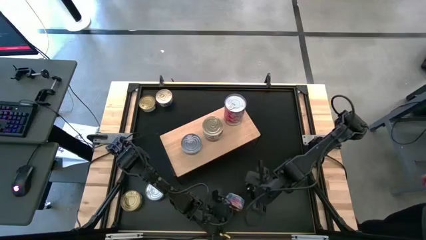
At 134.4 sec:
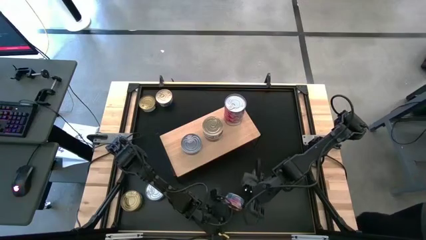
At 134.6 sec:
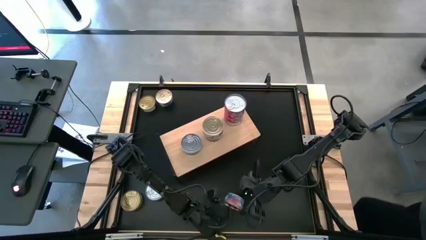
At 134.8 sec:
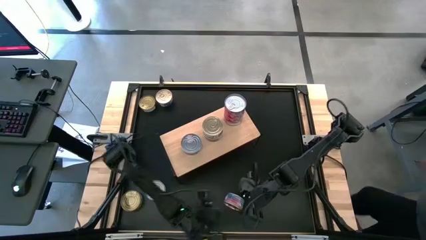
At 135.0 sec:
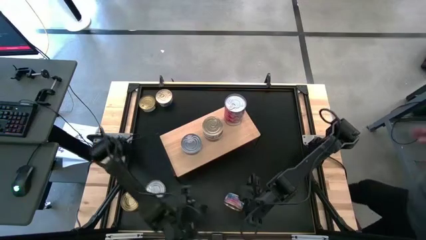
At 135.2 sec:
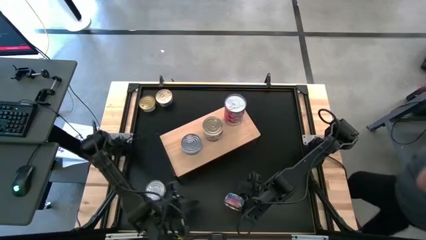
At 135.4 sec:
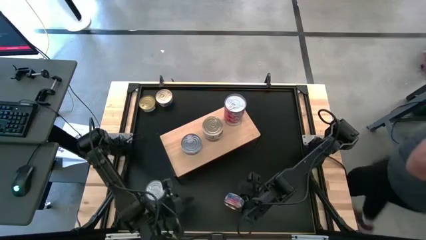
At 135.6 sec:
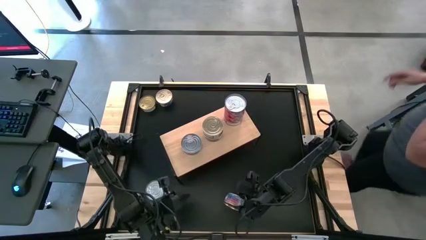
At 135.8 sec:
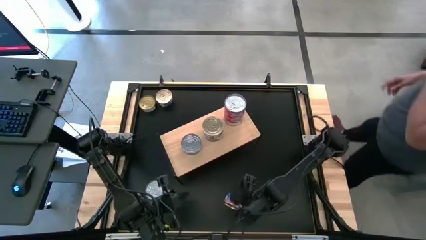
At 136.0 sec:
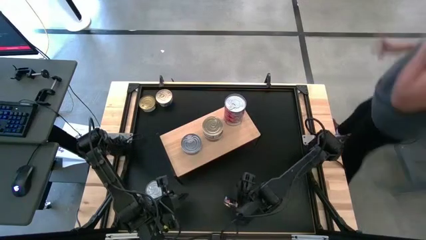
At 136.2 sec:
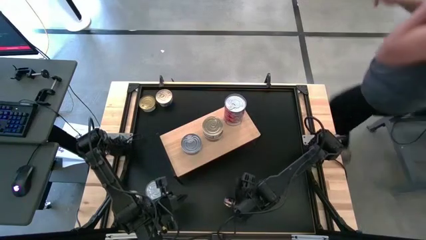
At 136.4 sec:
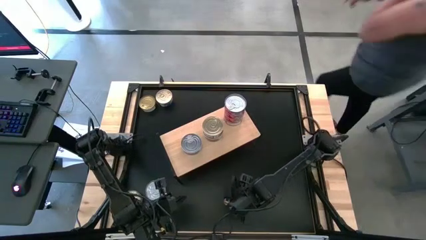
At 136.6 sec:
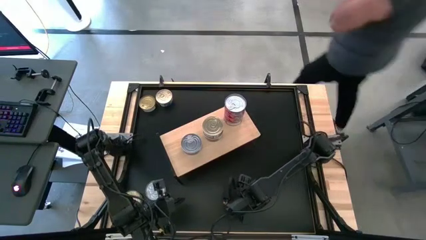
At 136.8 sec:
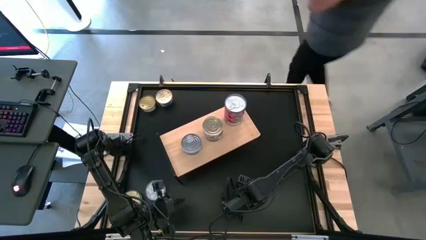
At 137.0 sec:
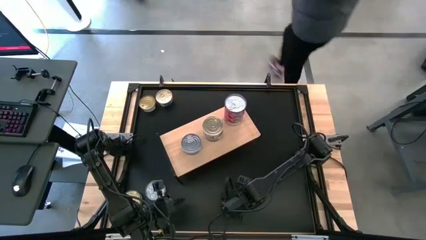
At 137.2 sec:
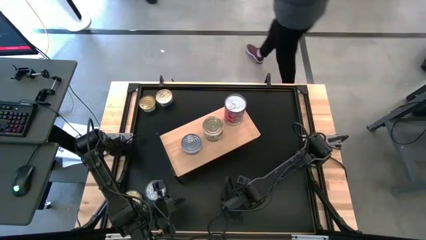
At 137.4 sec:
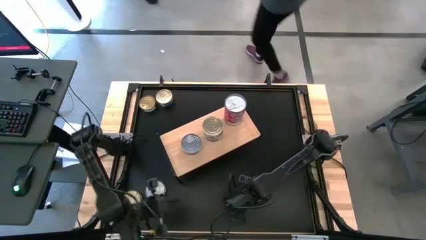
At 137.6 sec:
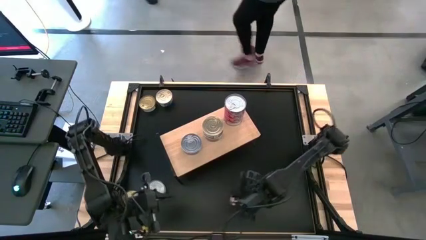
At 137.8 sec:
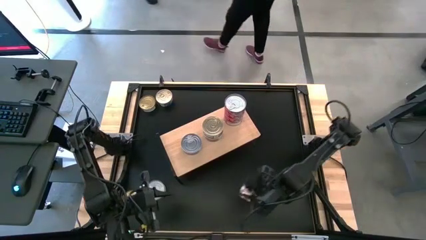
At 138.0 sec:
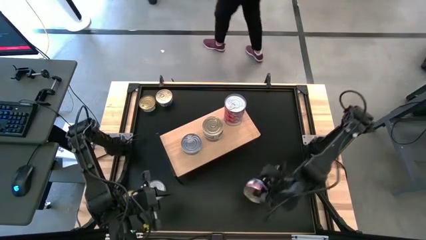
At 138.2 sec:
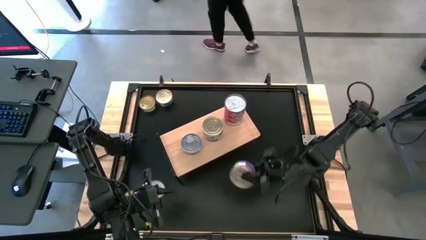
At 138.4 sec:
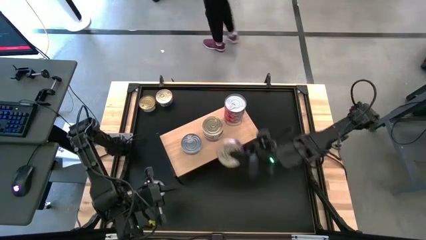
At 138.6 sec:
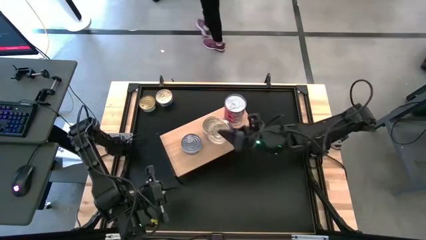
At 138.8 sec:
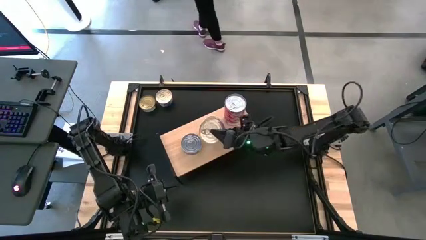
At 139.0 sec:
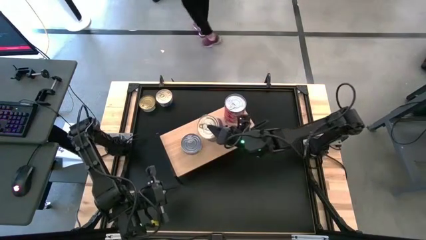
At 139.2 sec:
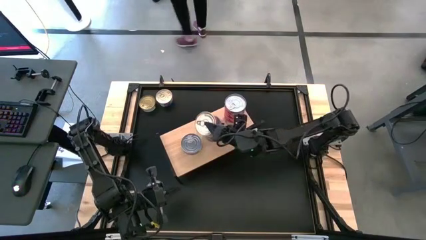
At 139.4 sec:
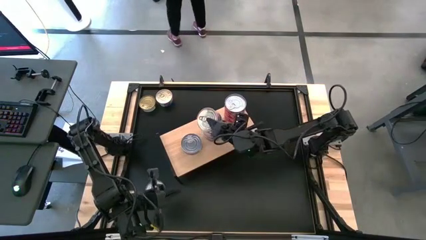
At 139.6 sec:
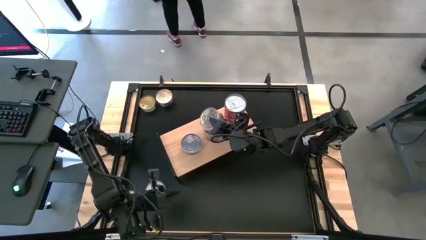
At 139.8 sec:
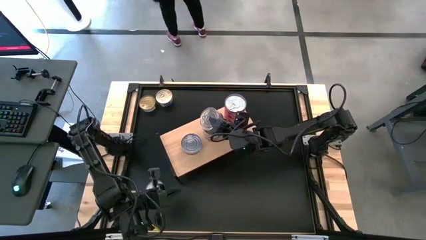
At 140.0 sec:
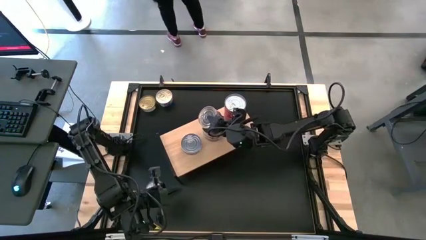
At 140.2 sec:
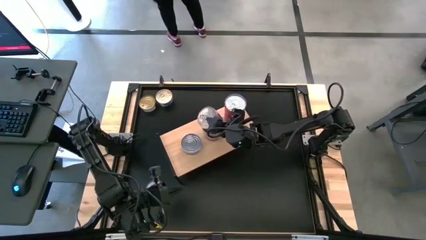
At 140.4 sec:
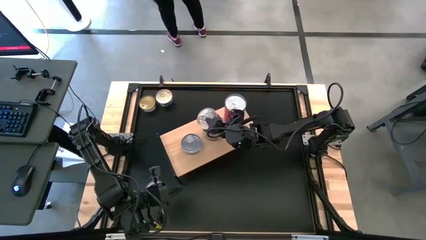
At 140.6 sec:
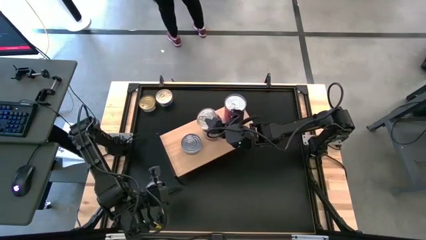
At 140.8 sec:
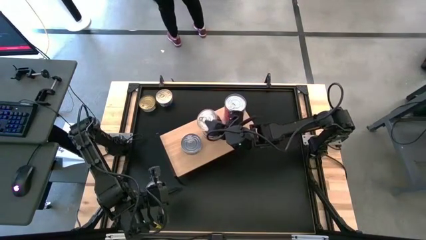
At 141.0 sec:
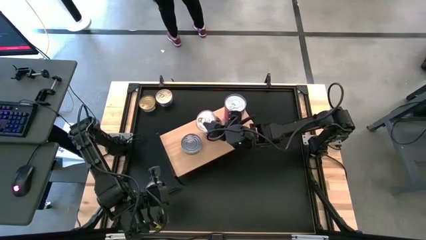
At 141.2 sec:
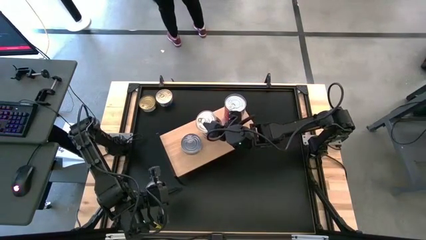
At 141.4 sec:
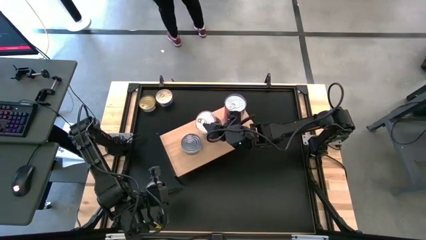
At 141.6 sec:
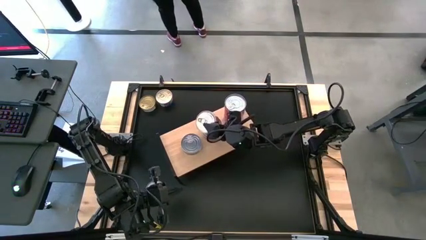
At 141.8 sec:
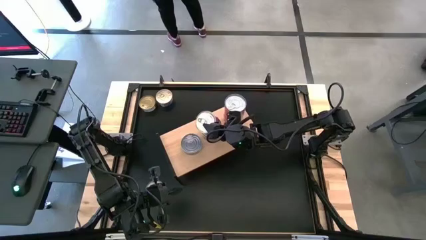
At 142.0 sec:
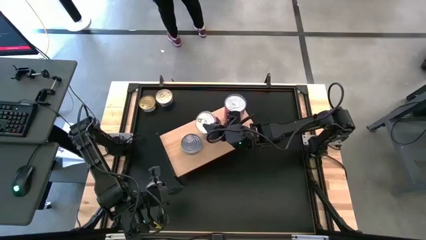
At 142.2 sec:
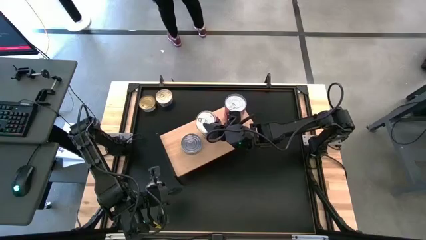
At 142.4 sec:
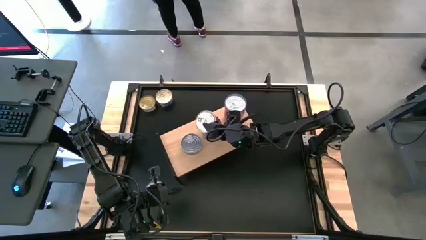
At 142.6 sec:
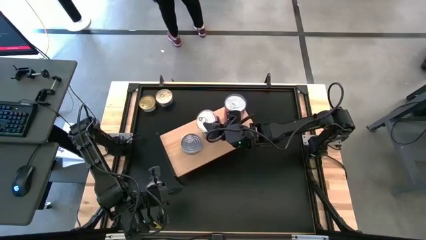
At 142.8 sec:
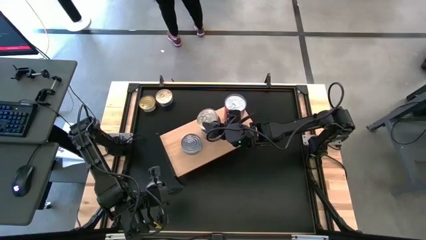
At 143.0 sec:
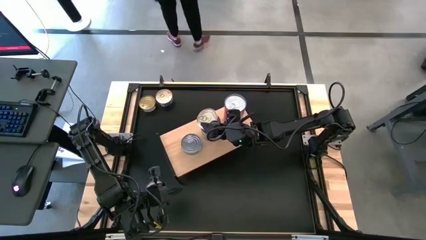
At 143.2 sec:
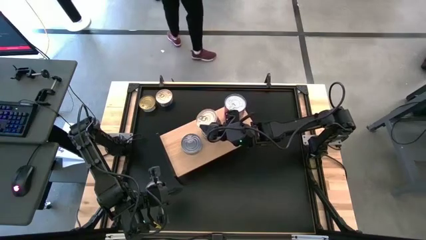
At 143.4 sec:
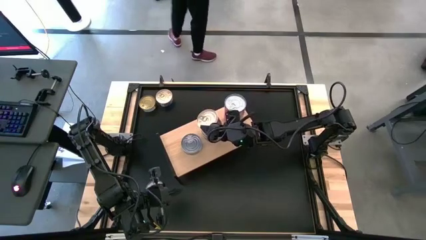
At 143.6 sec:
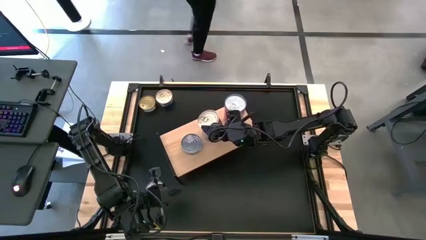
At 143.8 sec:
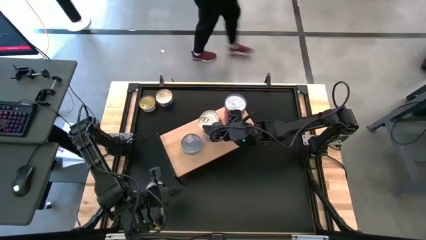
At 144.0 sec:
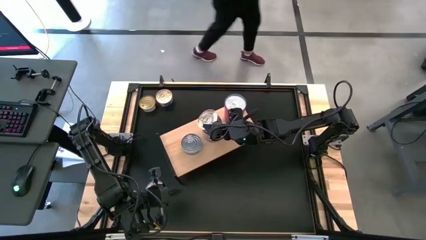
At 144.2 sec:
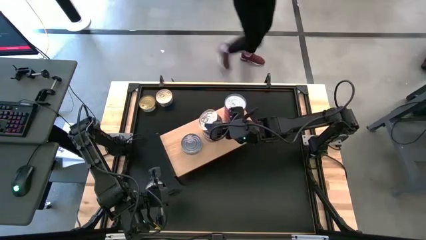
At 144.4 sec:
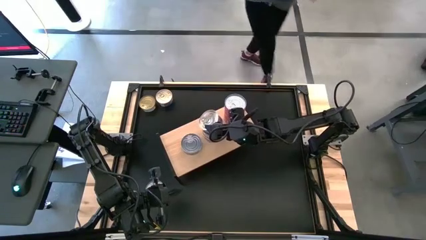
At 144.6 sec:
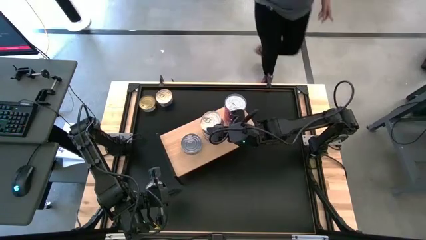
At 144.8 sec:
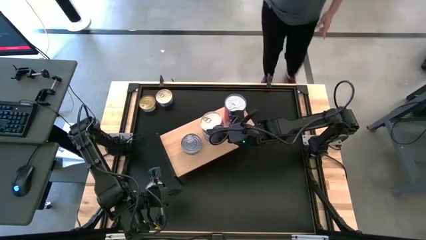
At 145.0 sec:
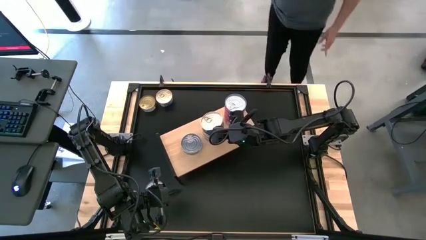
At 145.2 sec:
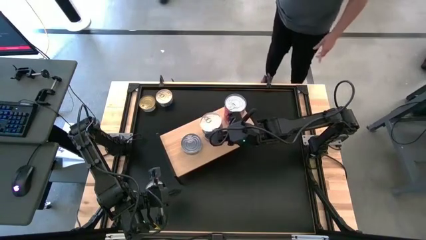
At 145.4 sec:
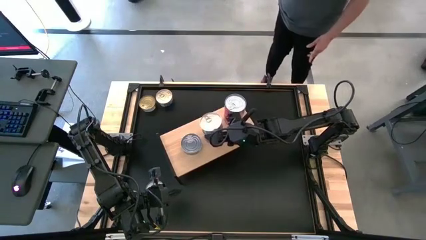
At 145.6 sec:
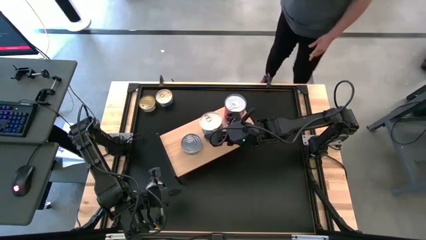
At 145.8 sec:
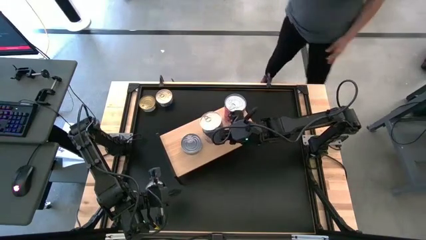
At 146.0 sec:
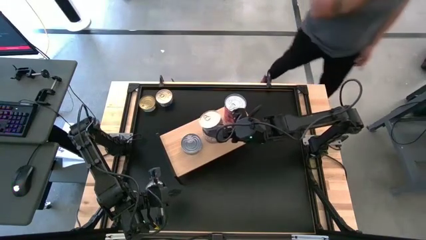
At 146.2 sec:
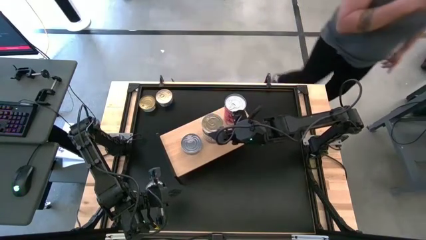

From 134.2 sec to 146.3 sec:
Task: Stack canned seafood by type on shelf
Stack the blue tuna on the top of the other blue tuna cans on the shelf

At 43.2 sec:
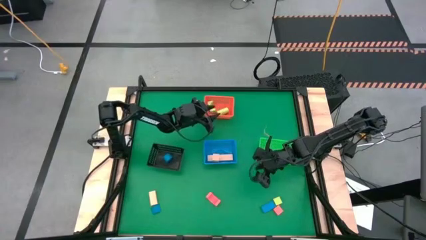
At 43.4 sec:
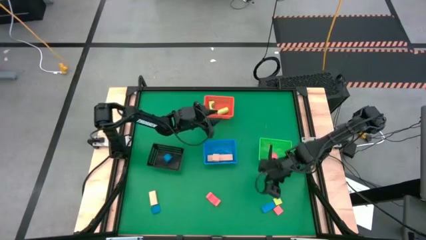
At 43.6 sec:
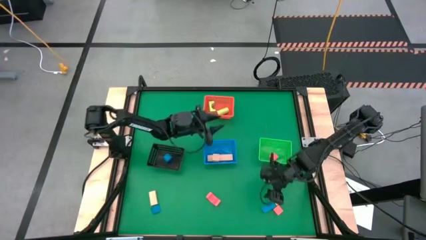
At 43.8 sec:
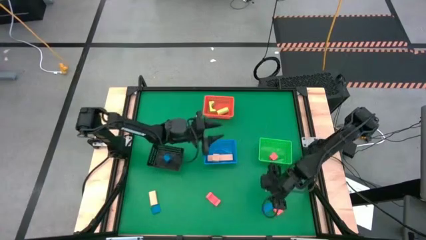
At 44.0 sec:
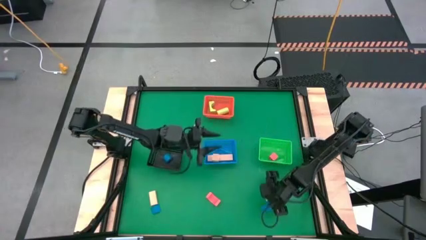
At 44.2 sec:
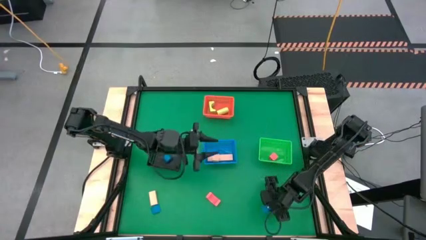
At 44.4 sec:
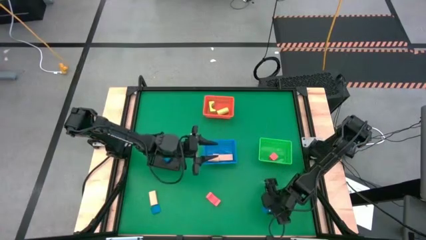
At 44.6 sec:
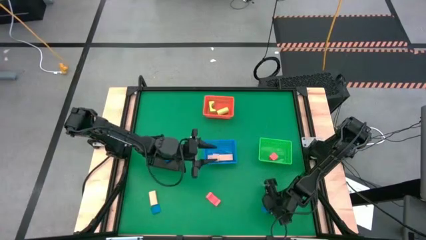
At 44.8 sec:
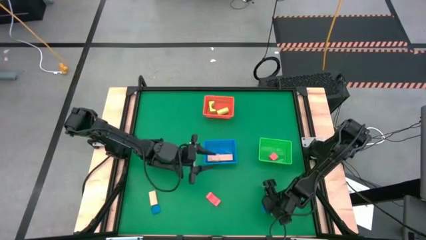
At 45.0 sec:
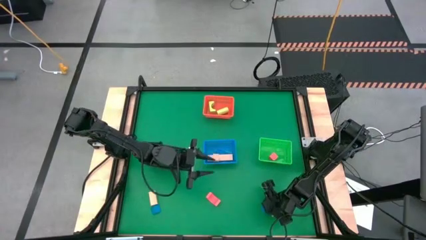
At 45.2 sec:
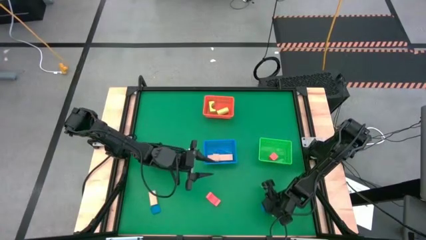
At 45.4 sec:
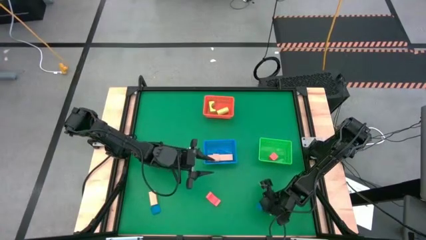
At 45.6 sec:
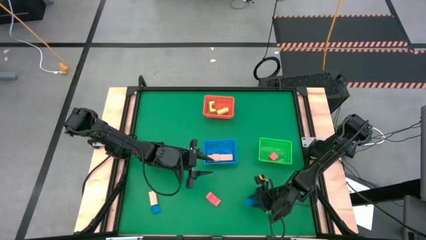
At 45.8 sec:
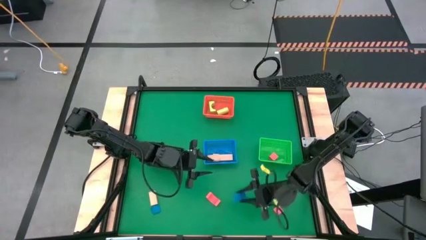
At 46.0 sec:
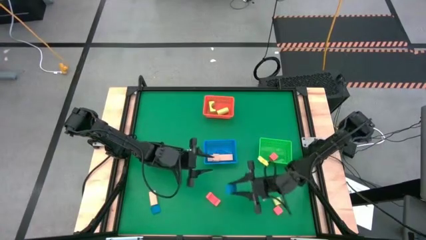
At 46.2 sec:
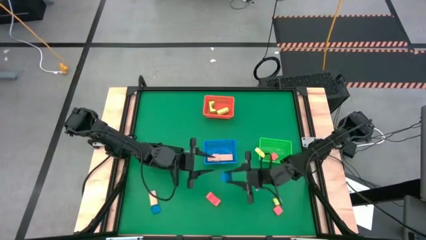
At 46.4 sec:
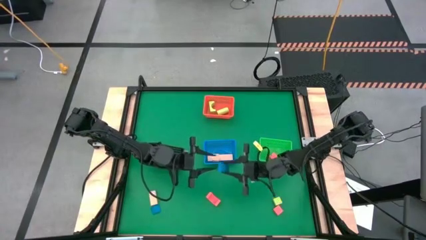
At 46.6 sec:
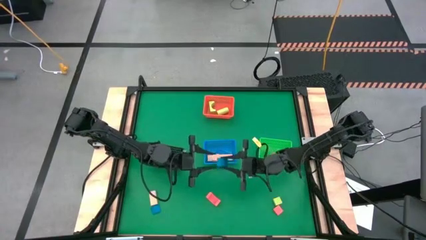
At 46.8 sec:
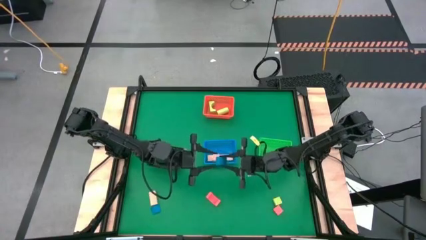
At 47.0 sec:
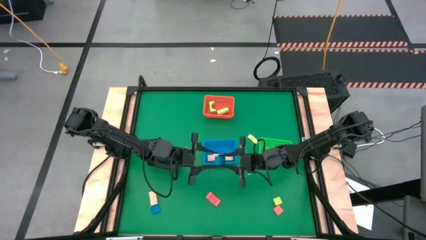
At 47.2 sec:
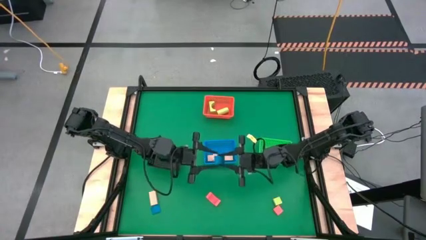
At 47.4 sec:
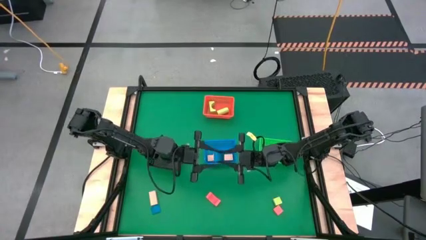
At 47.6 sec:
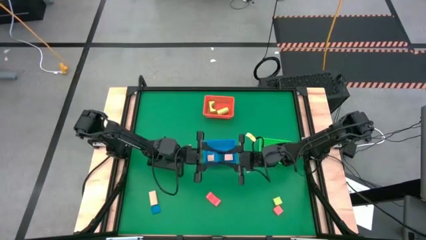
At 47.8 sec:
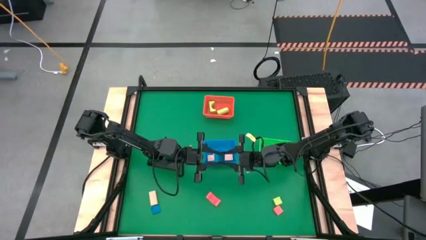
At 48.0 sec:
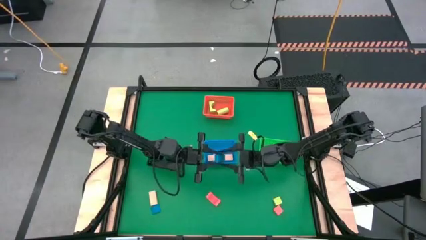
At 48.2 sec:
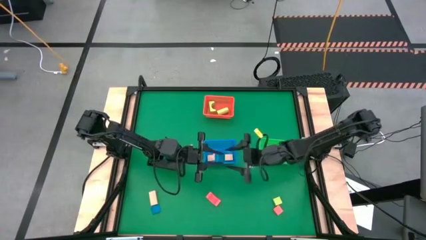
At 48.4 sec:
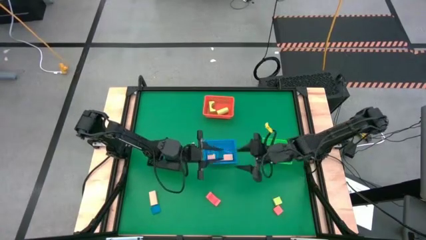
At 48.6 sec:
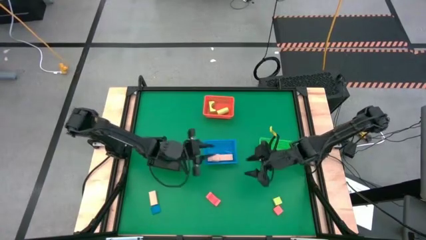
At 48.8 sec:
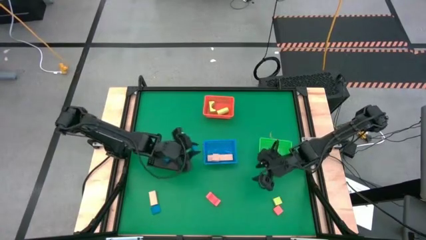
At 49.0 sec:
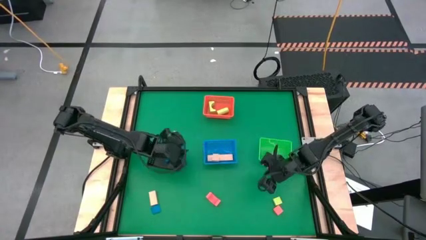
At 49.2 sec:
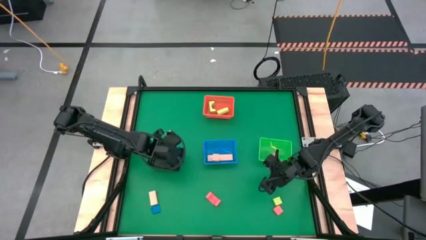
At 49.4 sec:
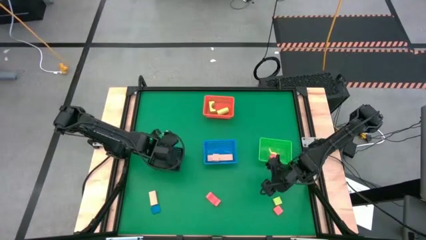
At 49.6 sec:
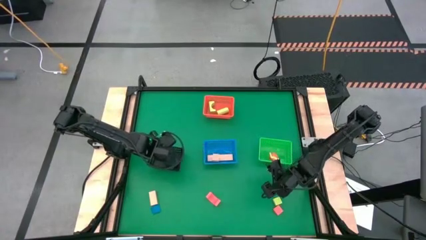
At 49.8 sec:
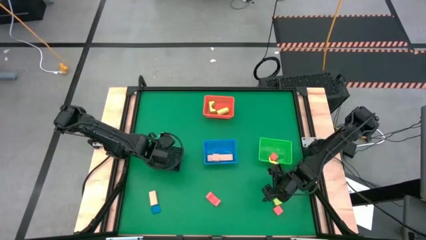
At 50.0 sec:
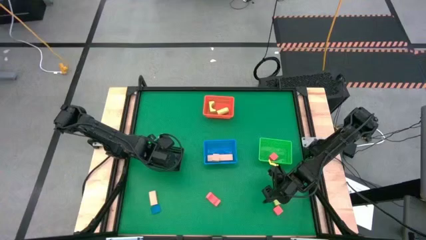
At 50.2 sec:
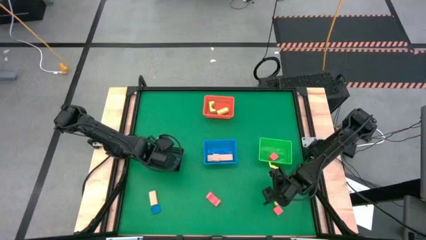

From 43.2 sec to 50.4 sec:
Task: Sort & place blocks by color
Put the right blue block into the black bin
